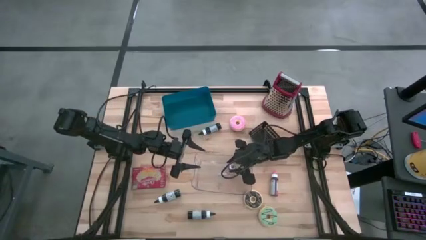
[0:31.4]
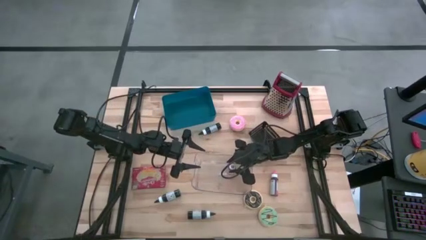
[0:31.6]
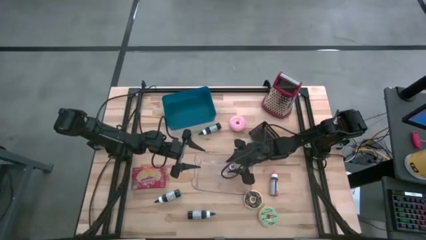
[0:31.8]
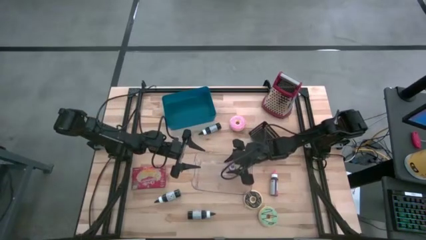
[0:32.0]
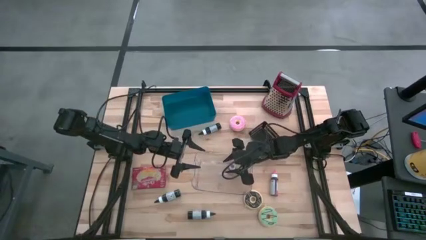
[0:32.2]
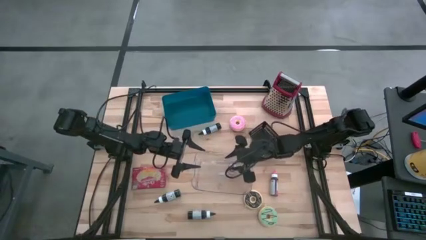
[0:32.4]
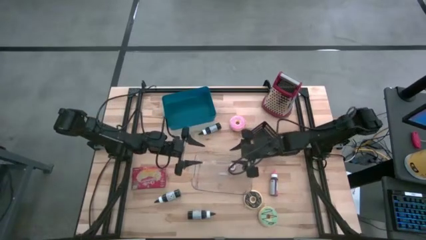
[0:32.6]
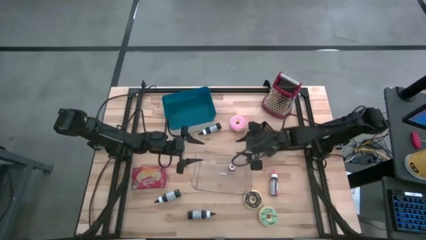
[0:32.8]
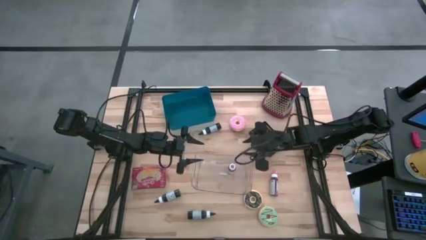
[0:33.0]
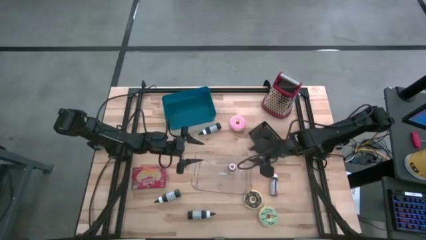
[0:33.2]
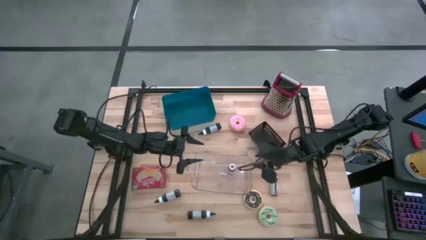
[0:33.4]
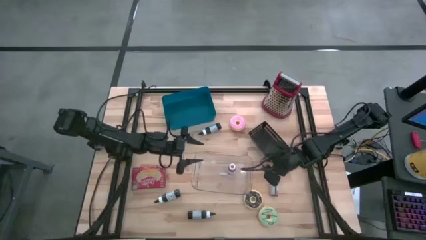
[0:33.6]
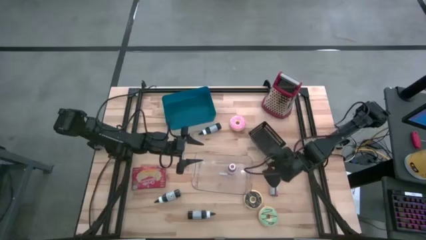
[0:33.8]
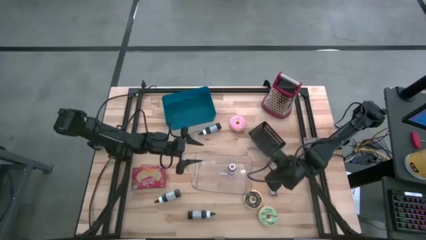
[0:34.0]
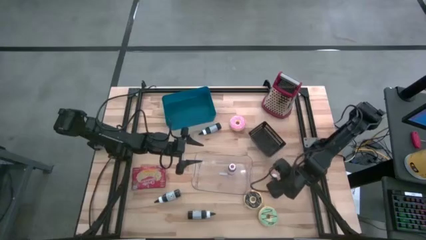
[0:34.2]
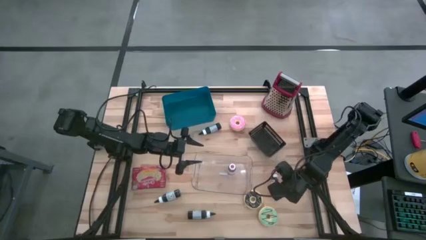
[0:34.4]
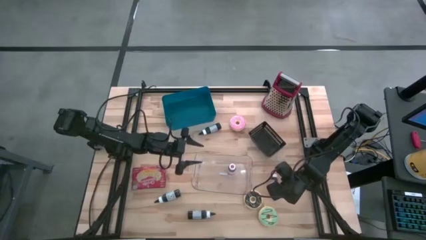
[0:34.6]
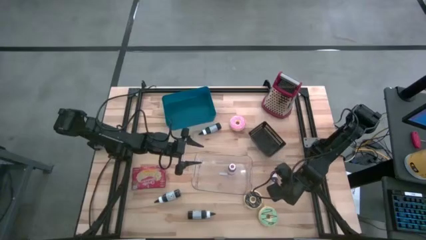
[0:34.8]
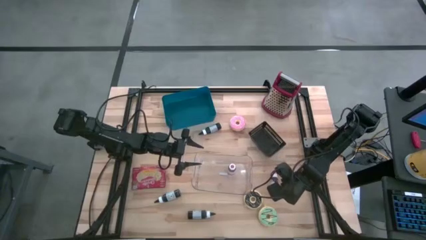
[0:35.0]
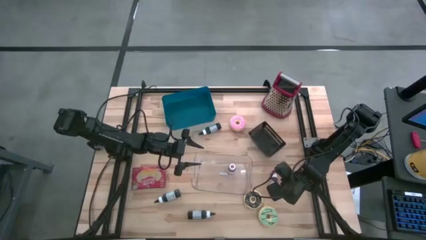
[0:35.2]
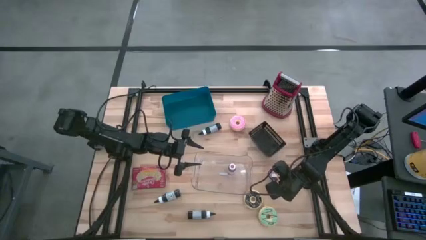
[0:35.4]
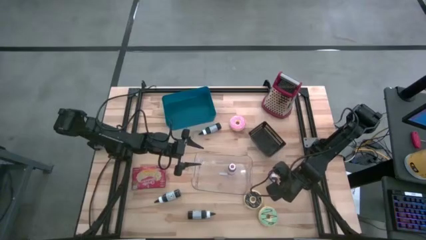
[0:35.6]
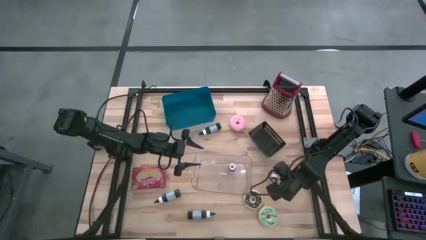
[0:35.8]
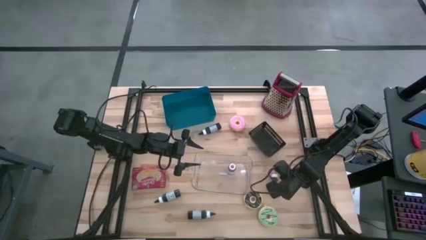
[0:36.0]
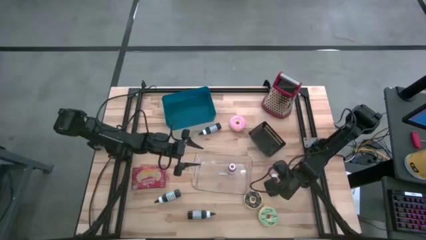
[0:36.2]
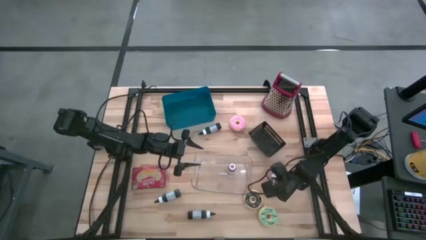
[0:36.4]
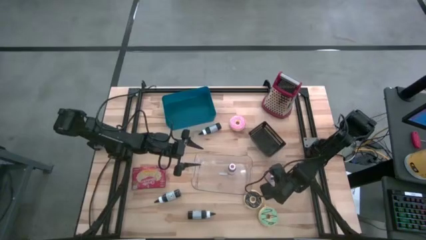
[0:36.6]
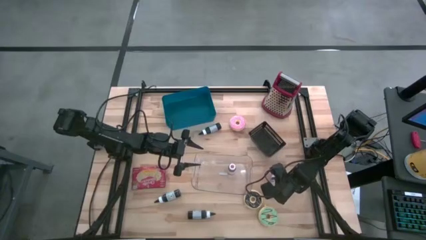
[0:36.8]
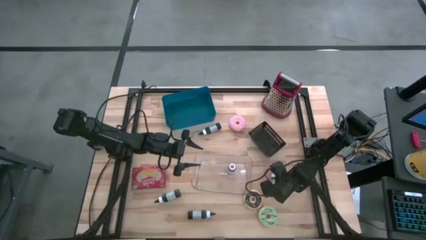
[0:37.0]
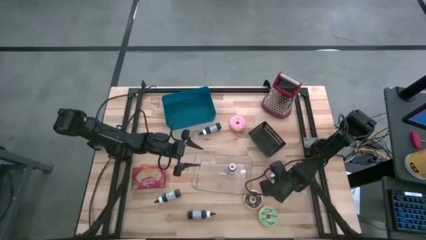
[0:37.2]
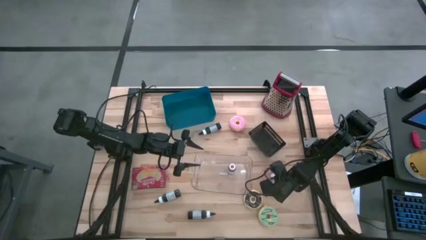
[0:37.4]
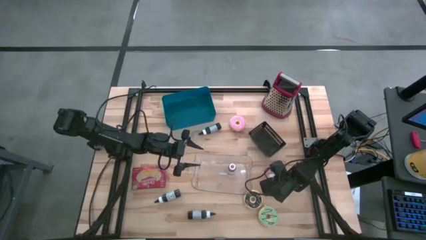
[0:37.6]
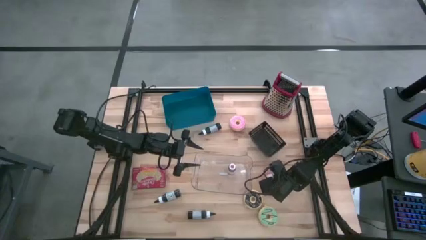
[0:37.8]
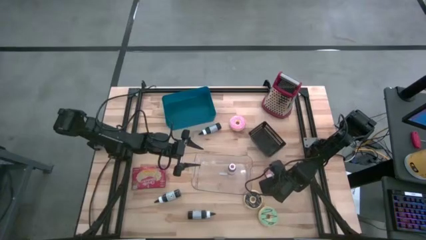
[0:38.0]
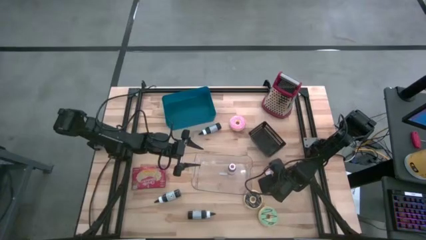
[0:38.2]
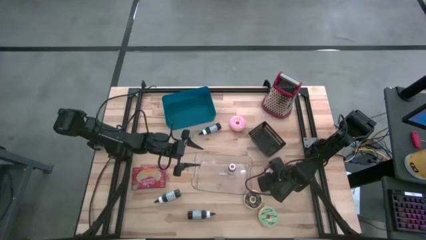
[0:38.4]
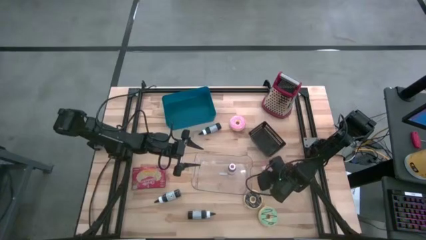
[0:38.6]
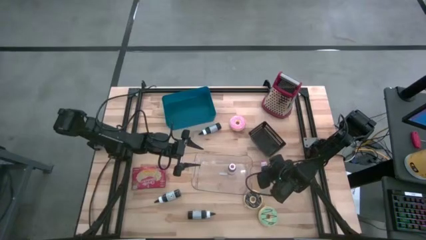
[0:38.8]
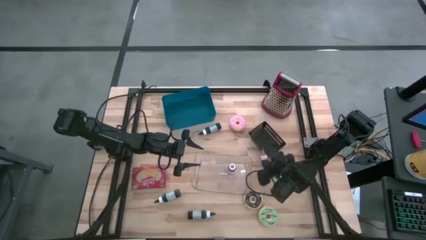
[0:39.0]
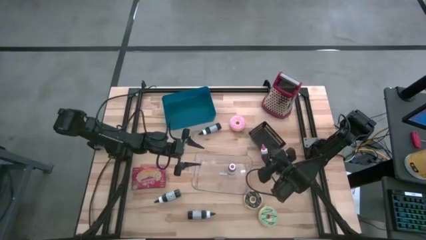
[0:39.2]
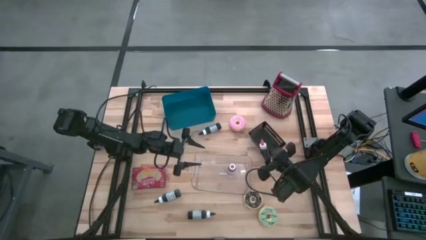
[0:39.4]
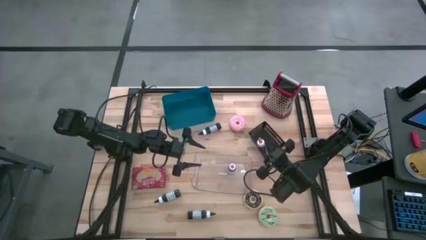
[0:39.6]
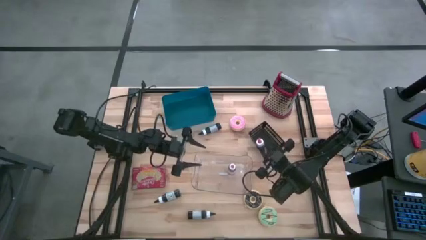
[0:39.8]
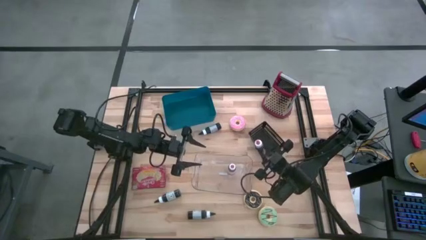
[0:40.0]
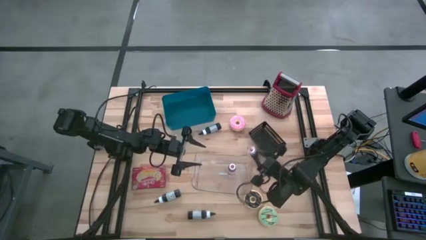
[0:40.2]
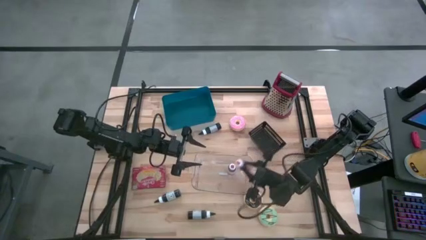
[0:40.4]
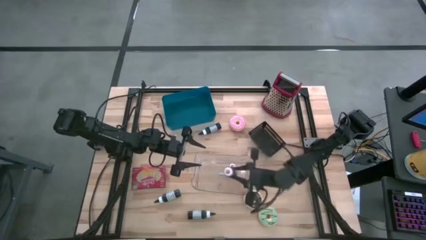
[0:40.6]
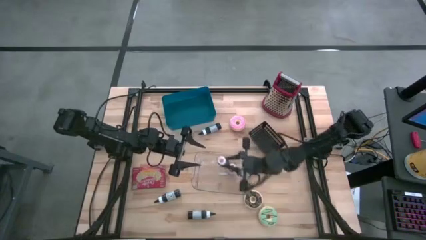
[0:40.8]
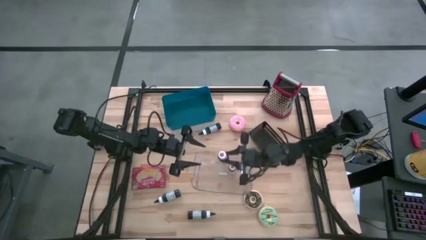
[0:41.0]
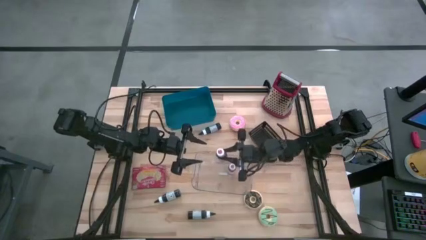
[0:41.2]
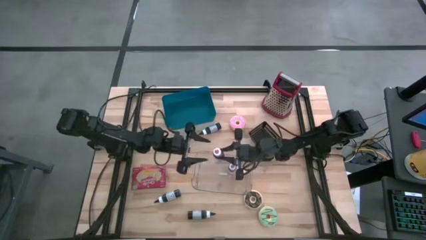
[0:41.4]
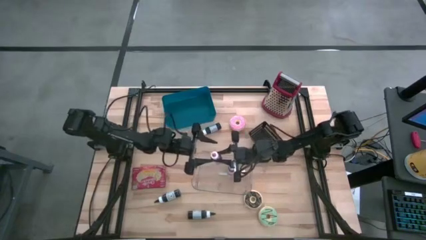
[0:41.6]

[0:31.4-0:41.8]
Put the pink food coloring bottle into the transparent bin

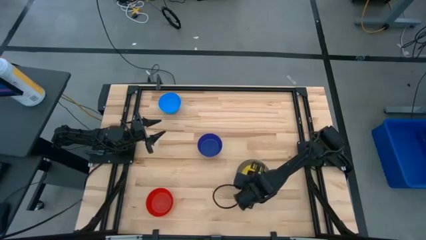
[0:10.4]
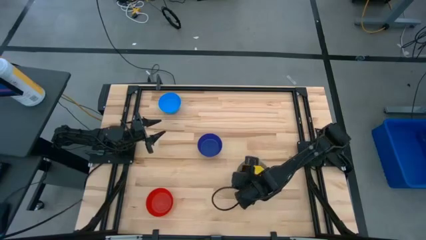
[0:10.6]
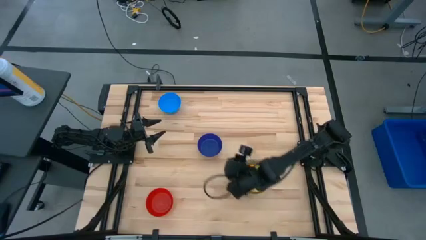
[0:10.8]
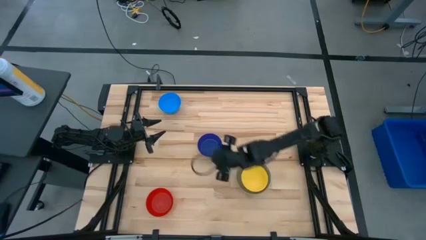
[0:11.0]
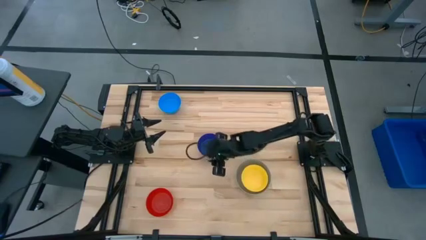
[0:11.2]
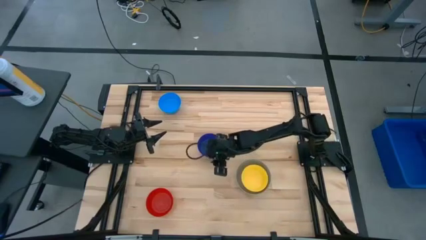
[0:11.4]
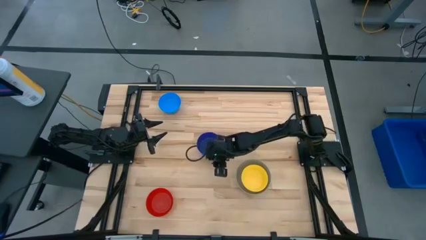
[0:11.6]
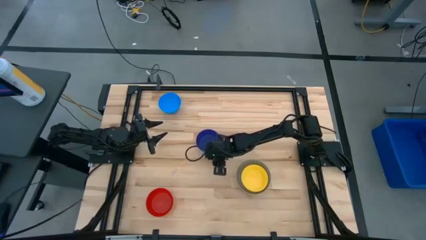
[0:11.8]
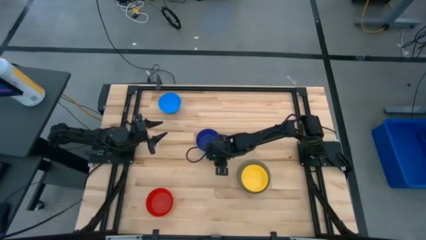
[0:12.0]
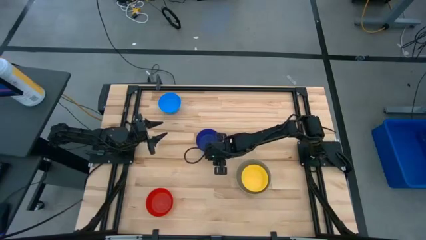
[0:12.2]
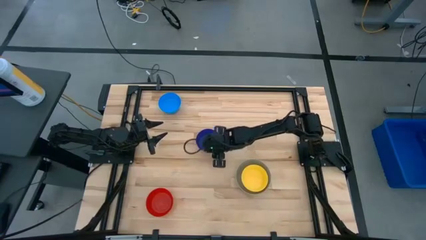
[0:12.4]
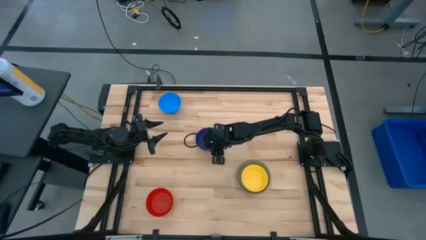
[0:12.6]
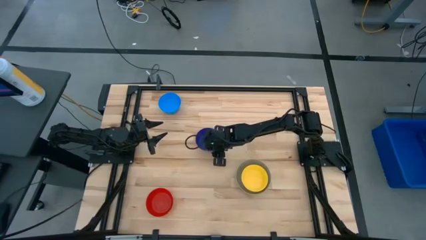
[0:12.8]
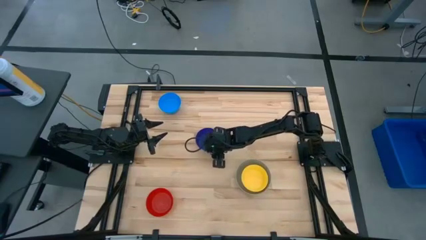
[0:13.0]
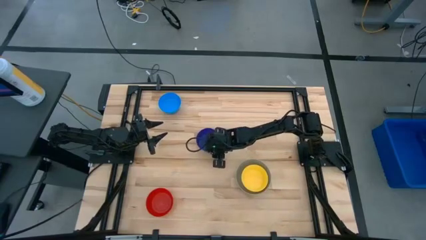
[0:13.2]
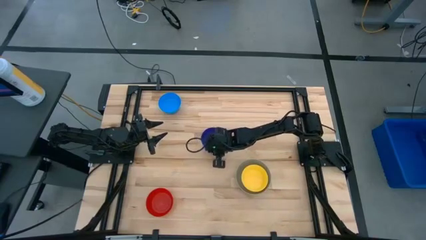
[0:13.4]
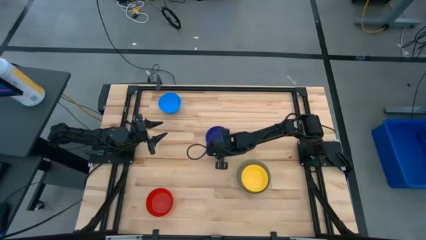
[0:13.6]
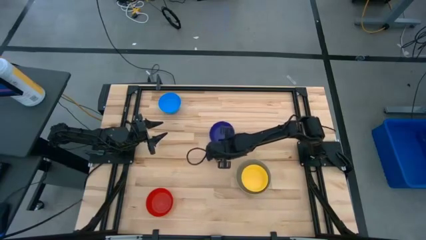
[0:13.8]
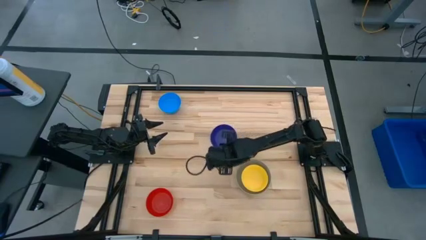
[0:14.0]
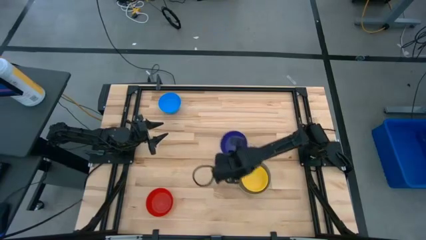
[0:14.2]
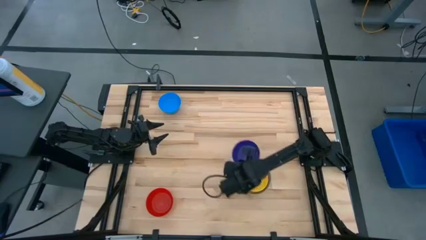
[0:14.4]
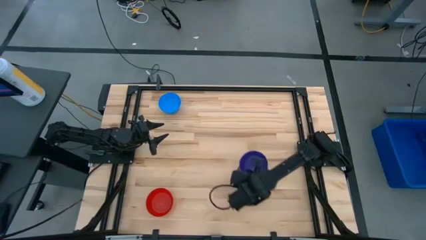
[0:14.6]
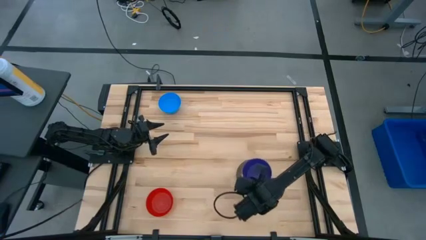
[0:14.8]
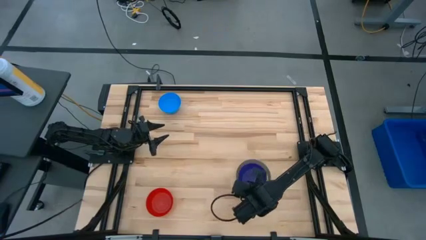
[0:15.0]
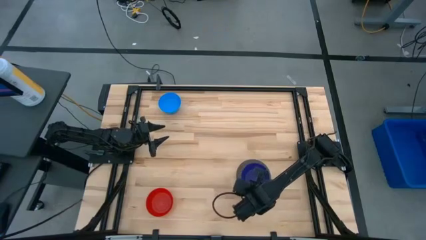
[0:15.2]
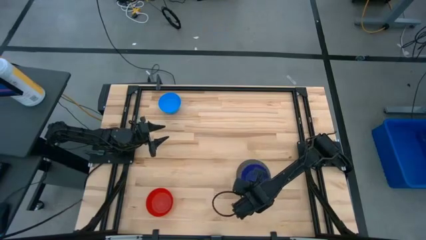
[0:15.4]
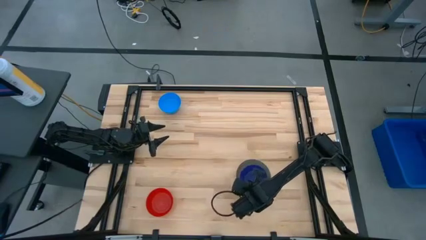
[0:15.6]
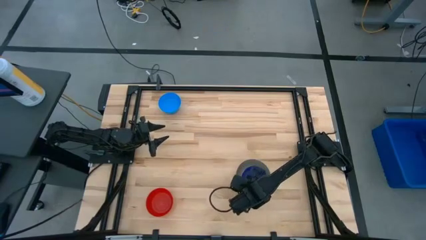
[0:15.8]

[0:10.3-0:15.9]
Stack the dark blue bowl on the yellow bowl
